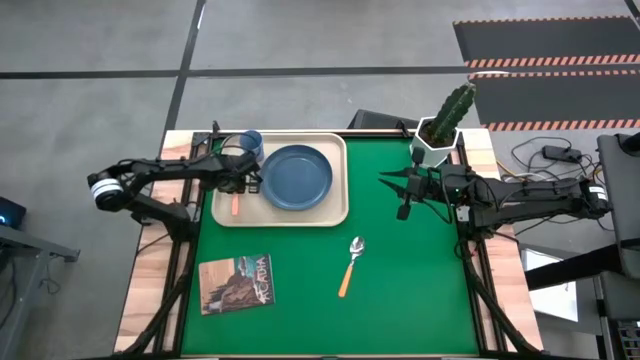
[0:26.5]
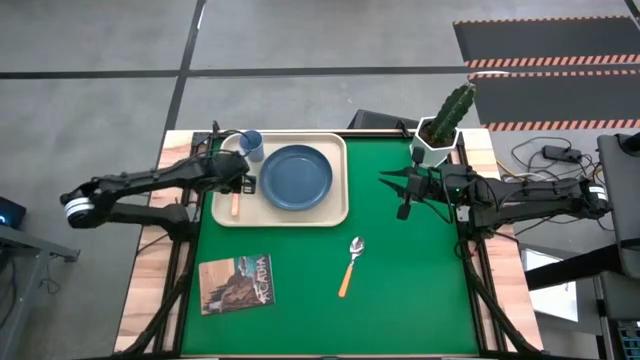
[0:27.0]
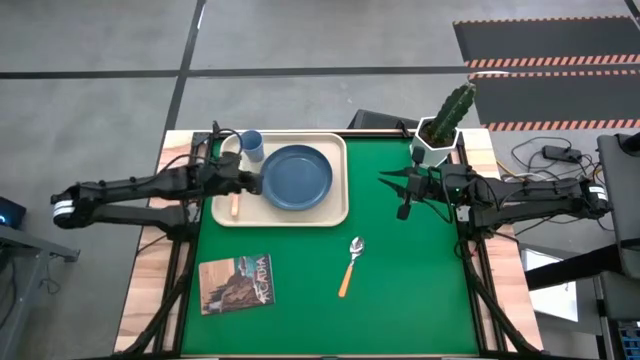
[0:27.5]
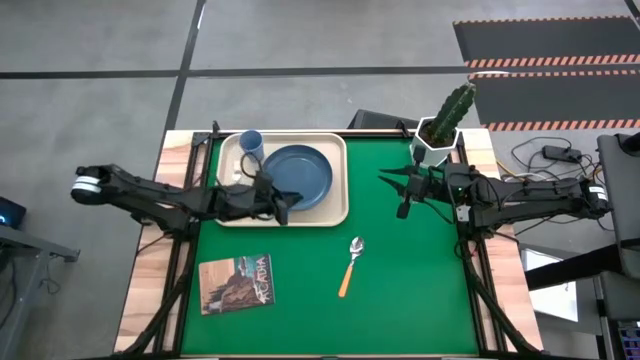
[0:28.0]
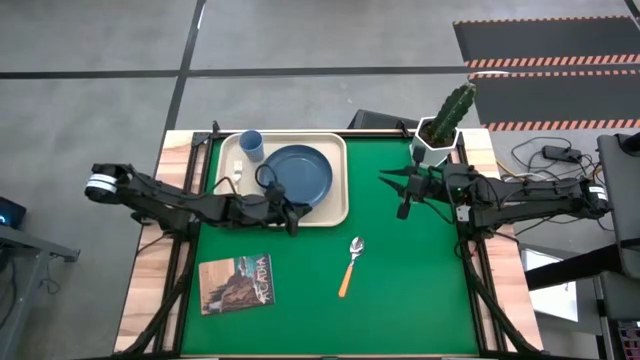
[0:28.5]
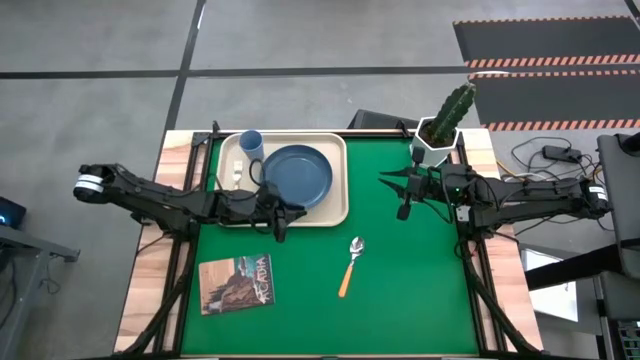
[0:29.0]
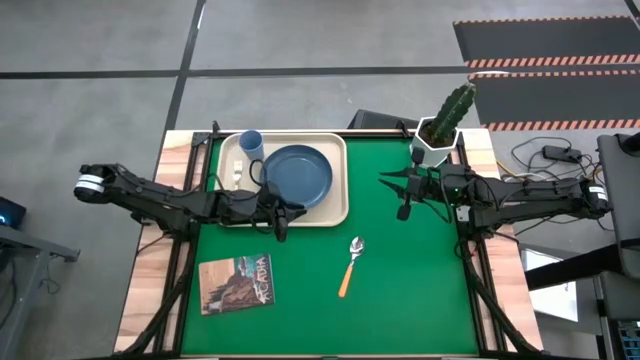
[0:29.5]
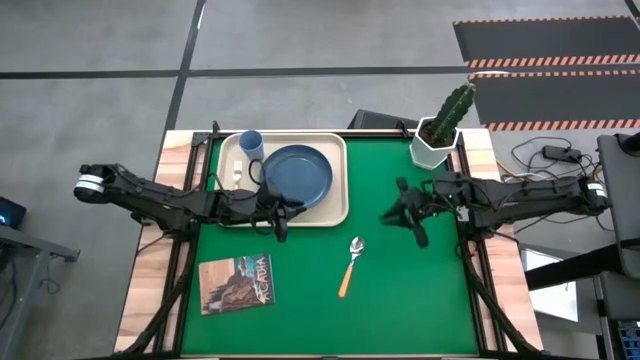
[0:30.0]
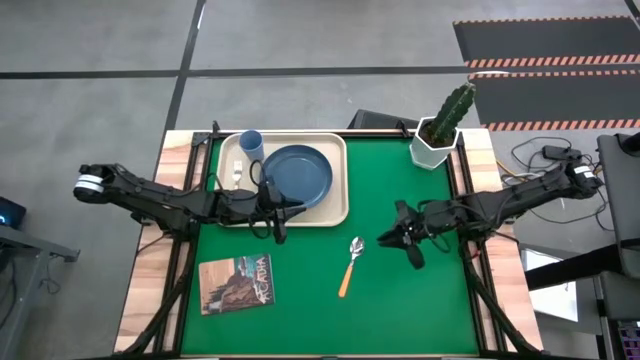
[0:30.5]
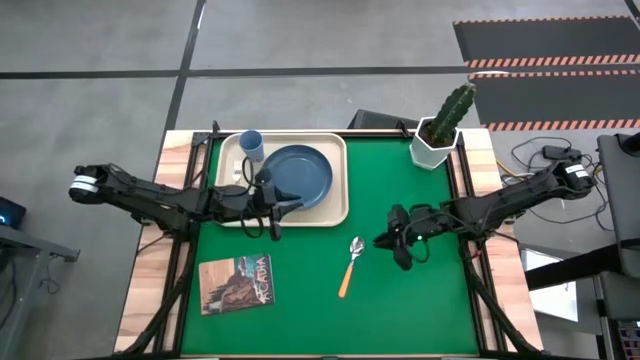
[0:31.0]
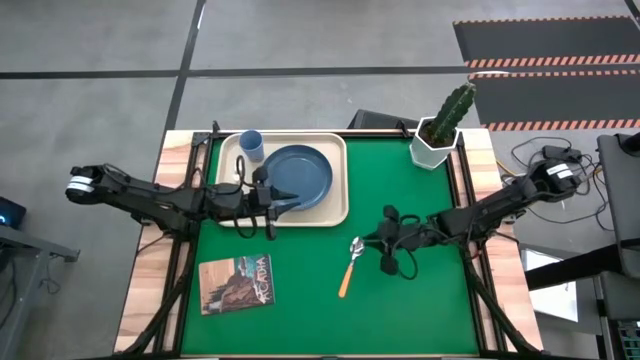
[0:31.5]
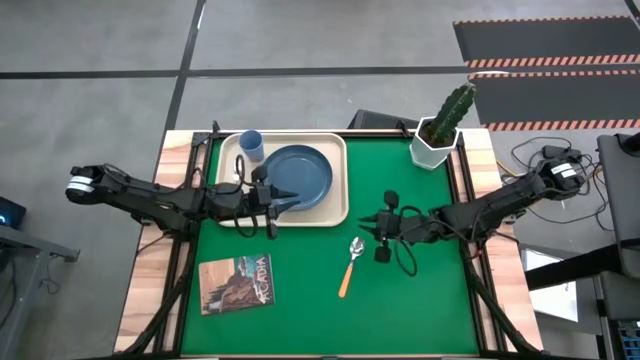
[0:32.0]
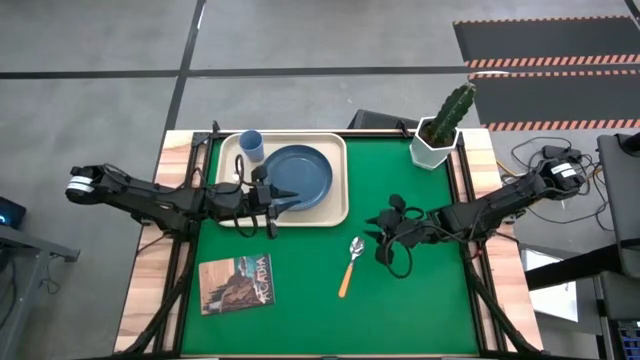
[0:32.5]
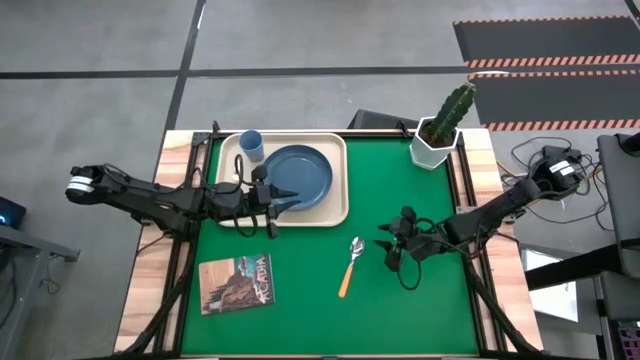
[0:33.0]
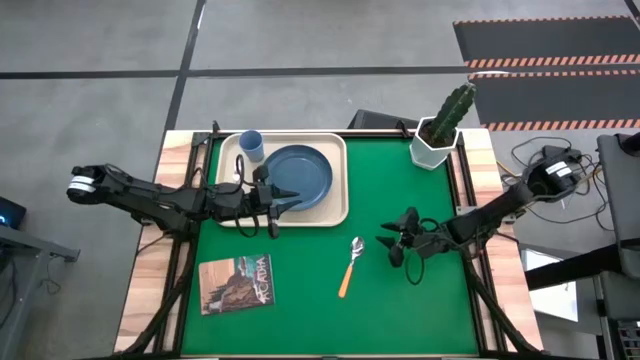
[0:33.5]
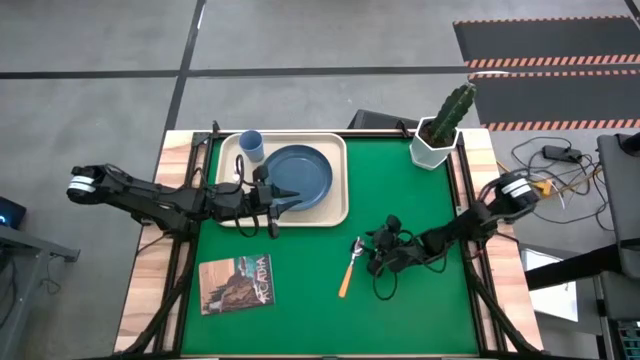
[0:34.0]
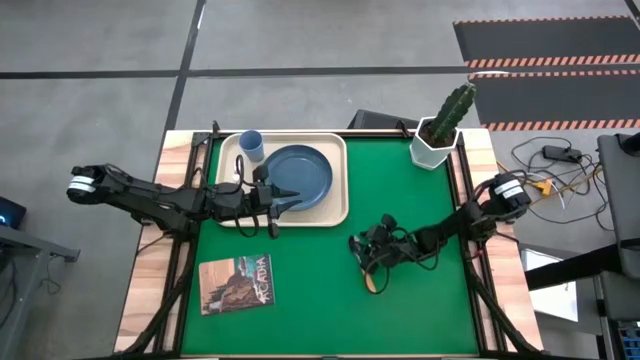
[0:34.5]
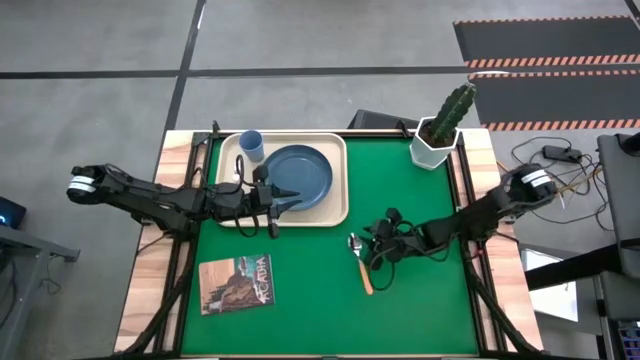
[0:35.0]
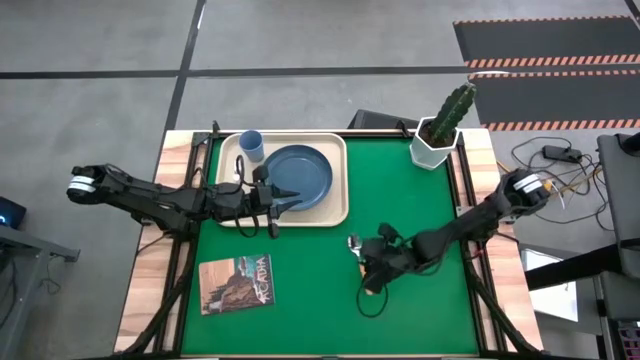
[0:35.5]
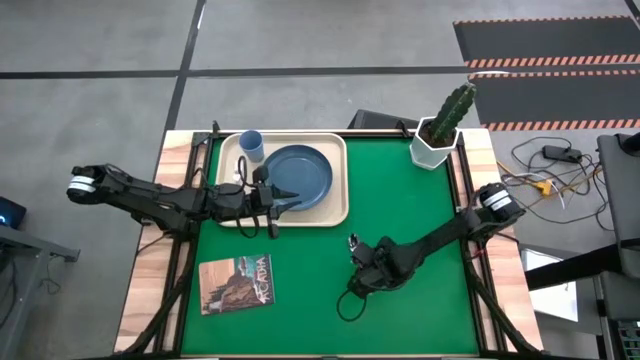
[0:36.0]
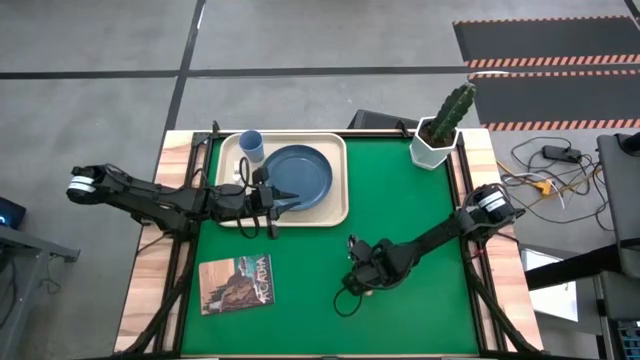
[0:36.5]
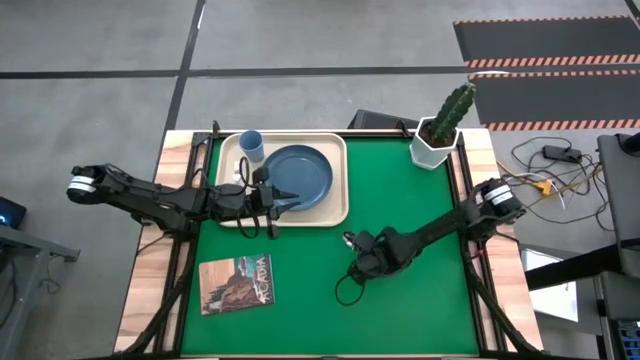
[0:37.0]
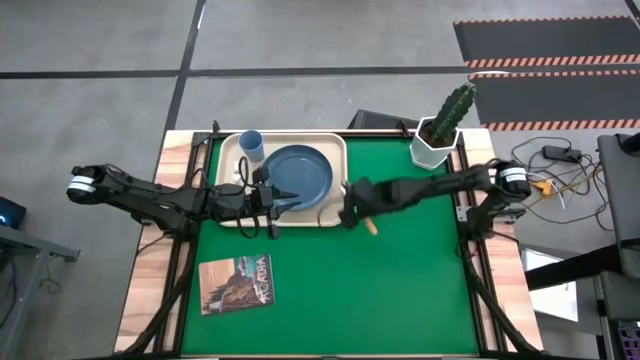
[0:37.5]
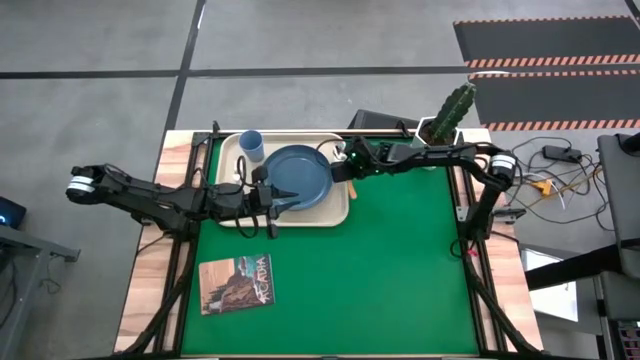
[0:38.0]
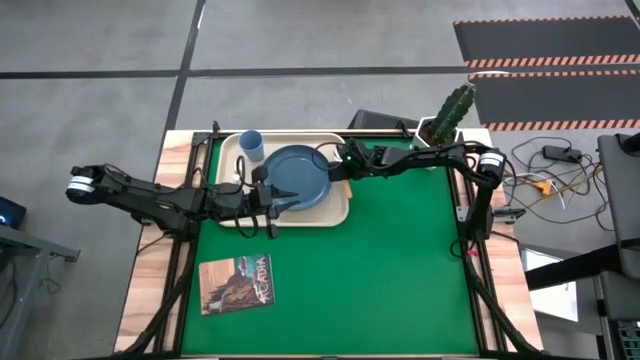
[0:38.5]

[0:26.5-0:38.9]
Task: Pick and place plate/cup/fork/spoon on tray
Put the orange spoon on the white tray to the right of the blue plate

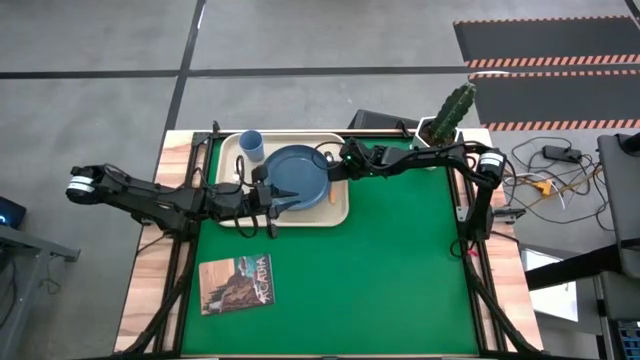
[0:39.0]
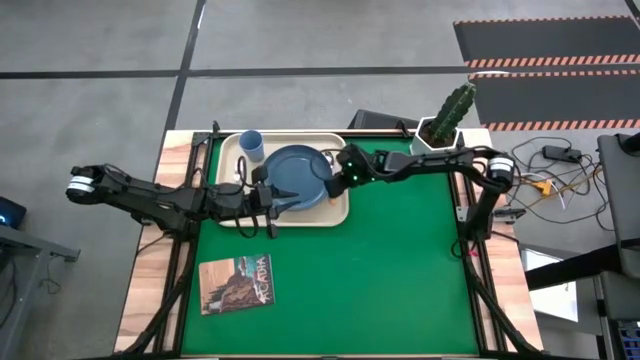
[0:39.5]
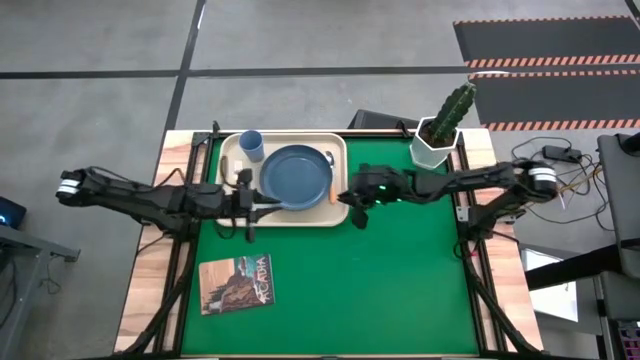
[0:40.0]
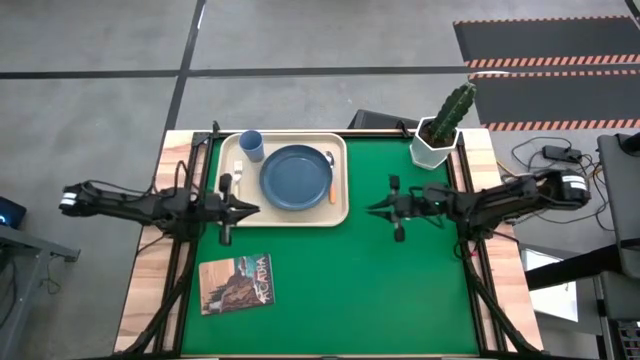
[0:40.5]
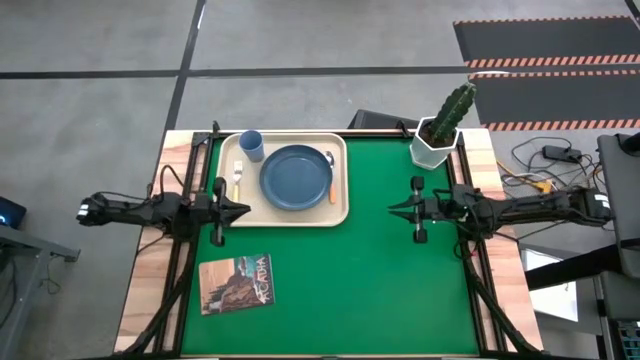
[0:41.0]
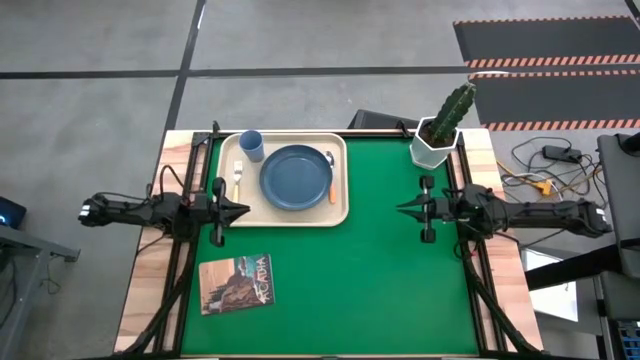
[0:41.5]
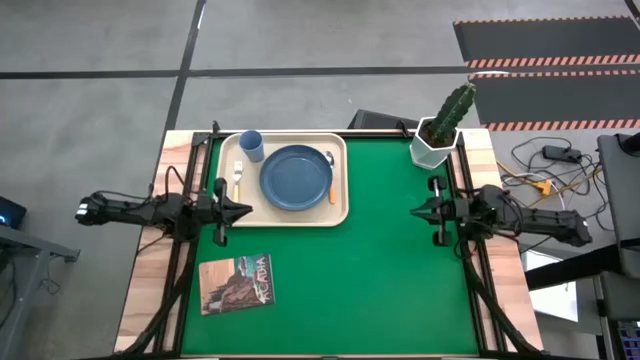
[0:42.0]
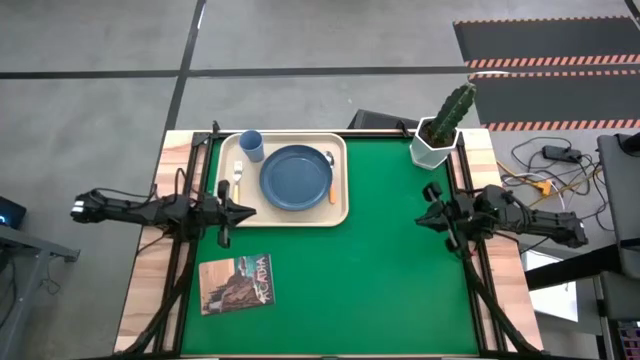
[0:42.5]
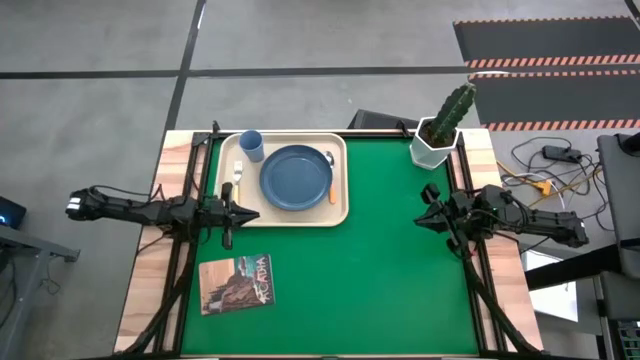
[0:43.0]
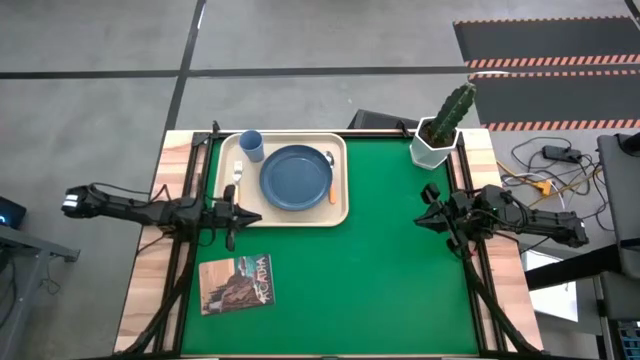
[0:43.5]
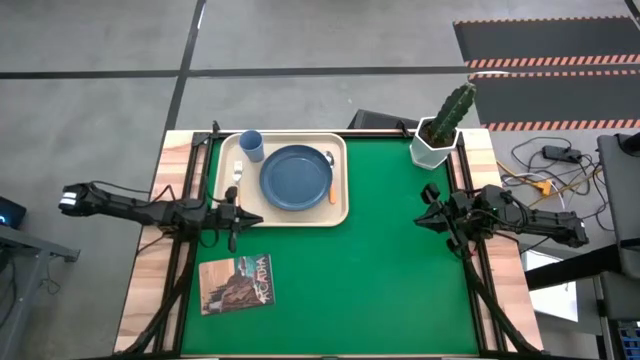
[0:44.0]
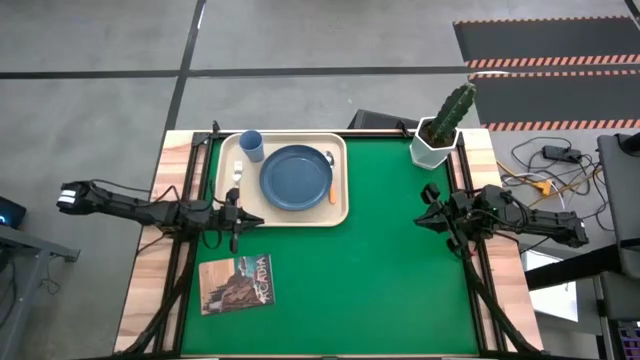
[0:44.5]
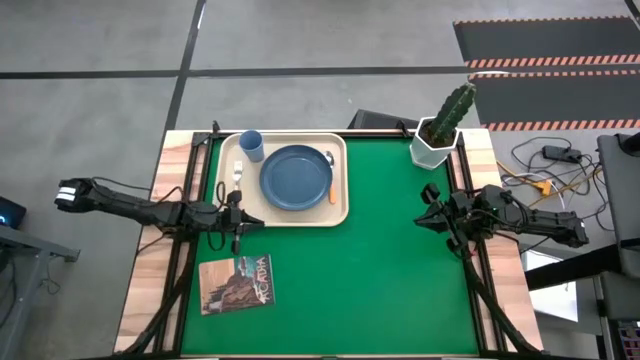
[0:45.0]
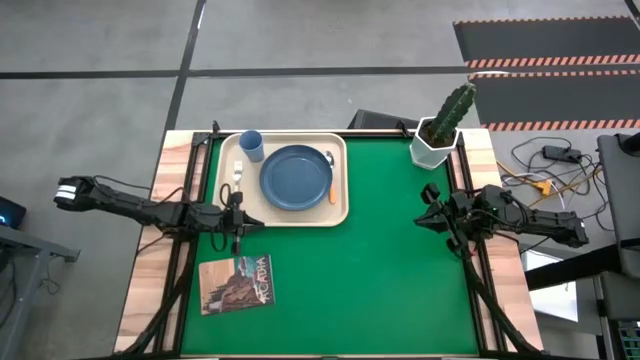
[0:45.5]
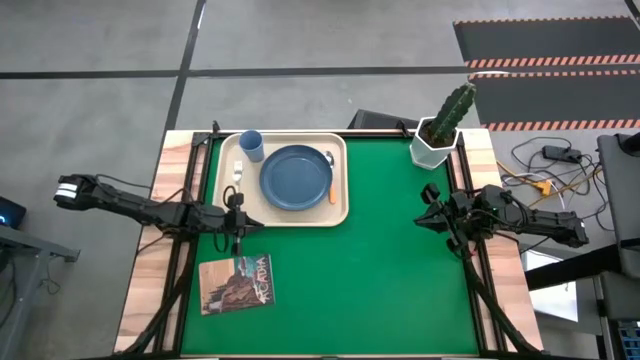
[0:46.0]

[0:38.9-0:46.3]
Return to Home Position
